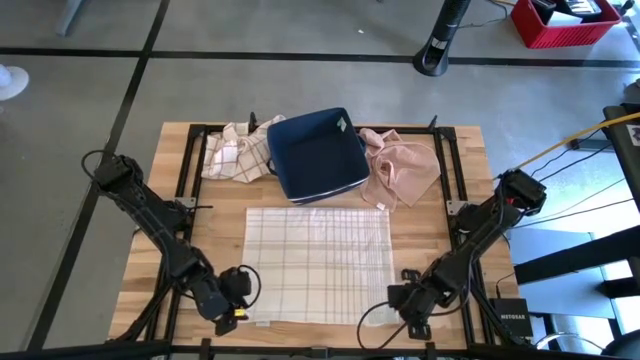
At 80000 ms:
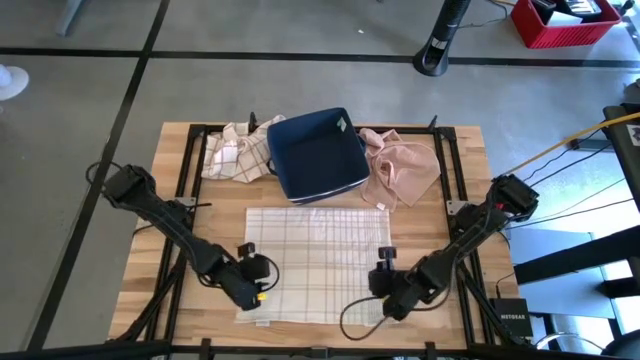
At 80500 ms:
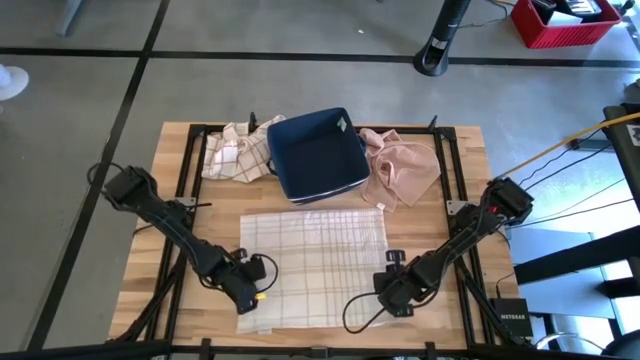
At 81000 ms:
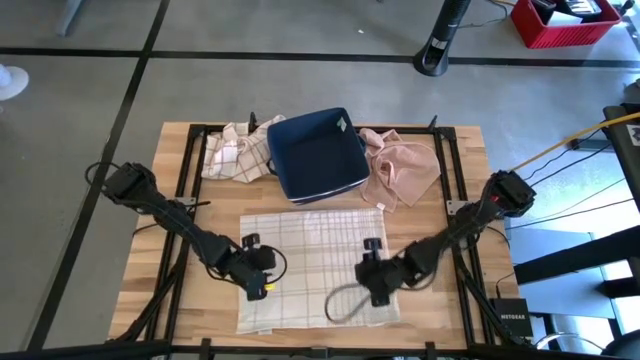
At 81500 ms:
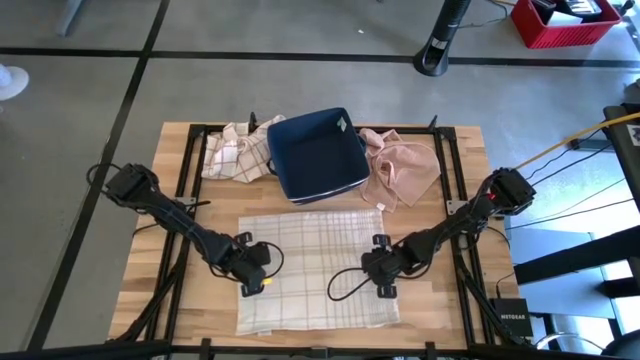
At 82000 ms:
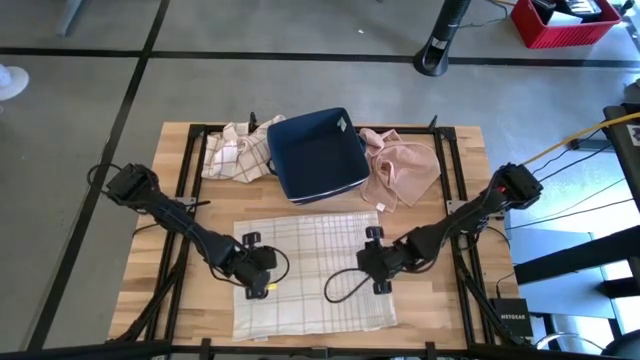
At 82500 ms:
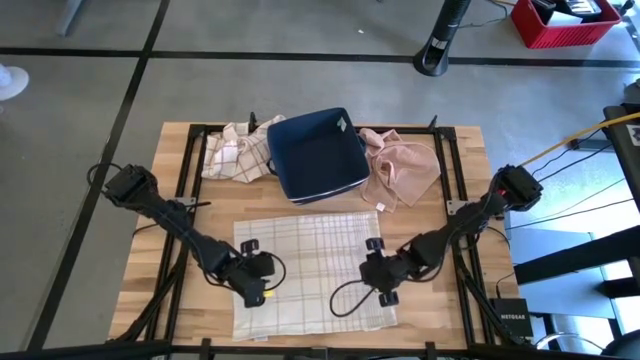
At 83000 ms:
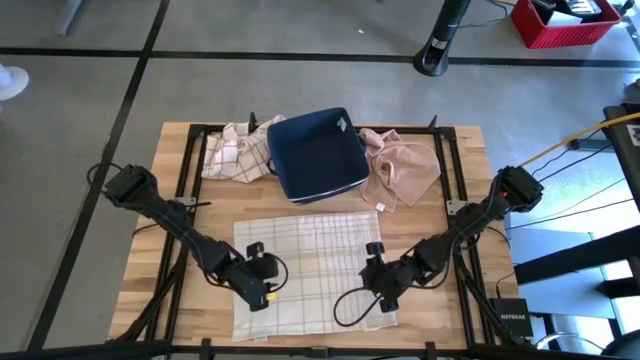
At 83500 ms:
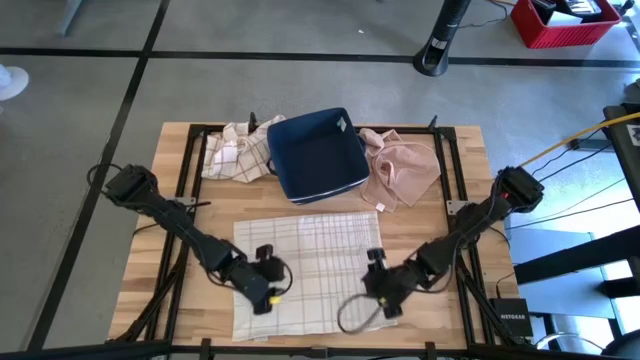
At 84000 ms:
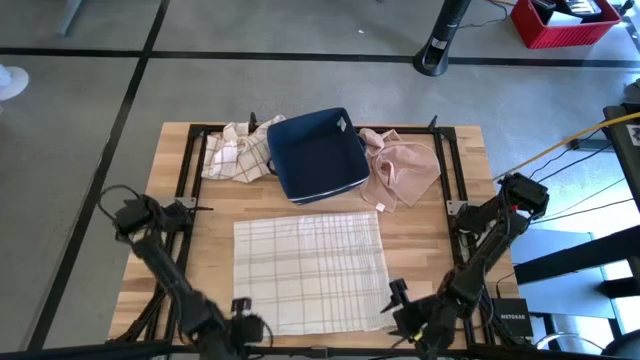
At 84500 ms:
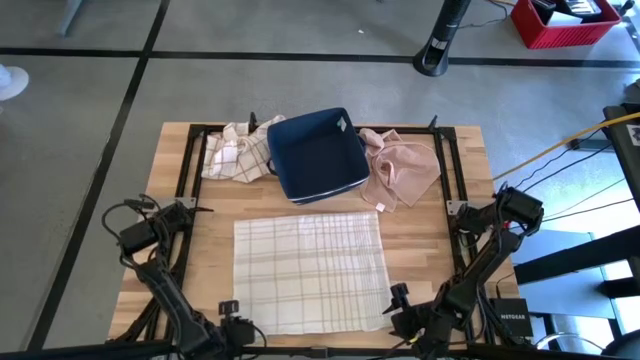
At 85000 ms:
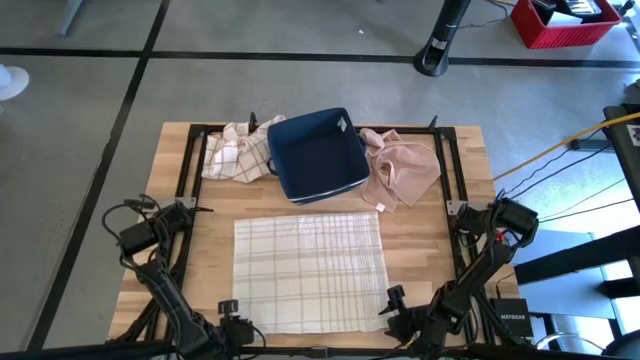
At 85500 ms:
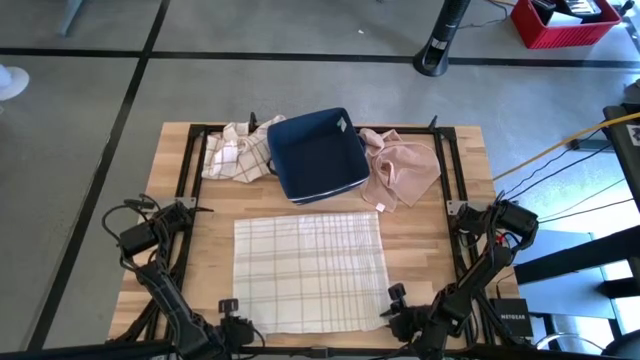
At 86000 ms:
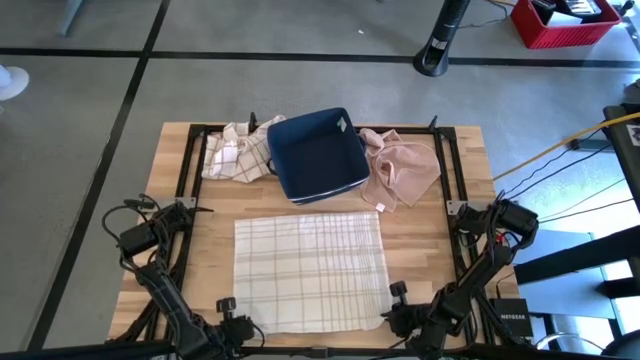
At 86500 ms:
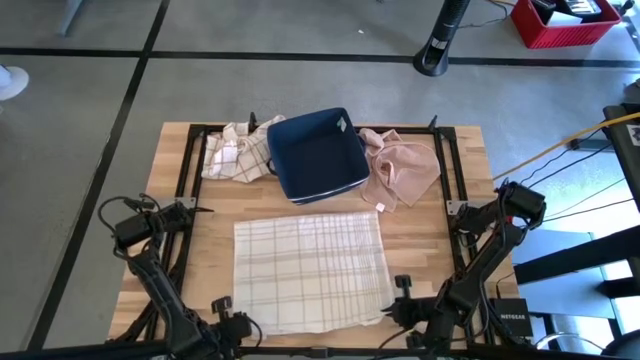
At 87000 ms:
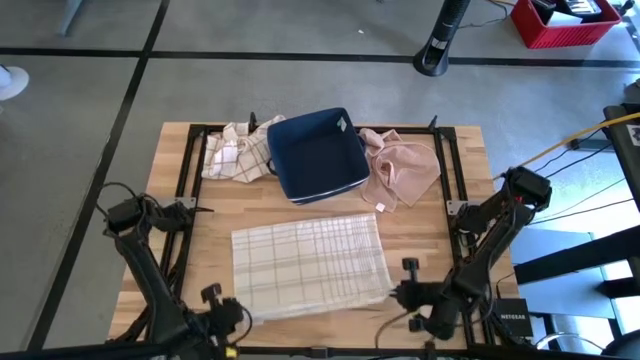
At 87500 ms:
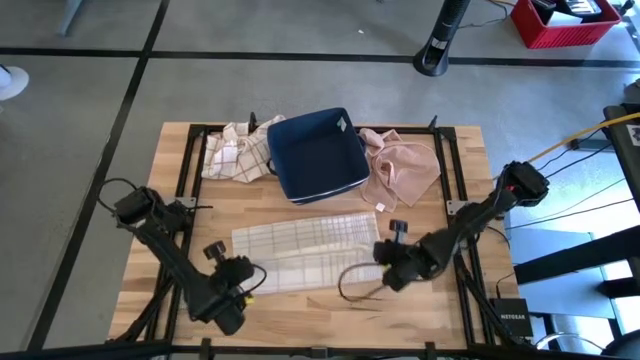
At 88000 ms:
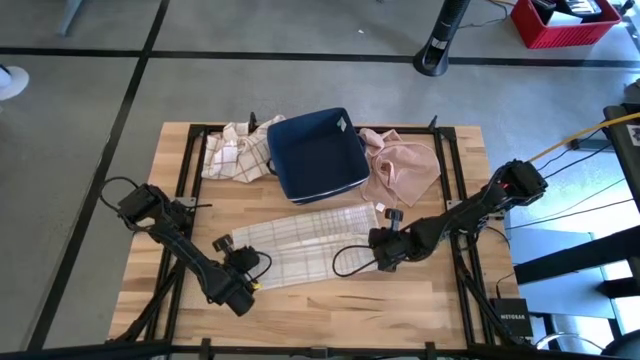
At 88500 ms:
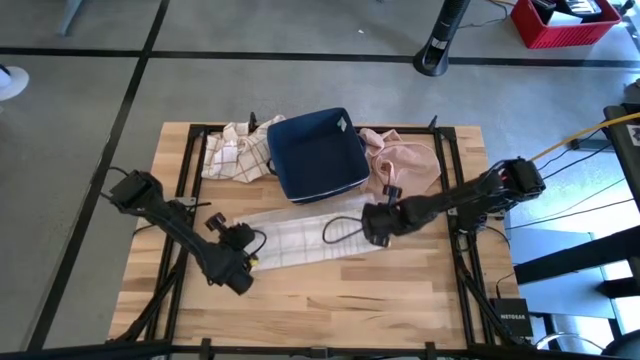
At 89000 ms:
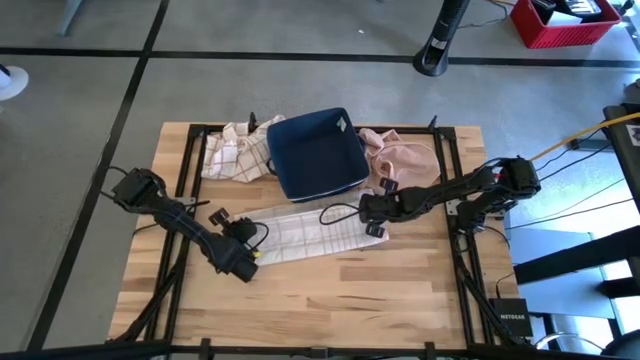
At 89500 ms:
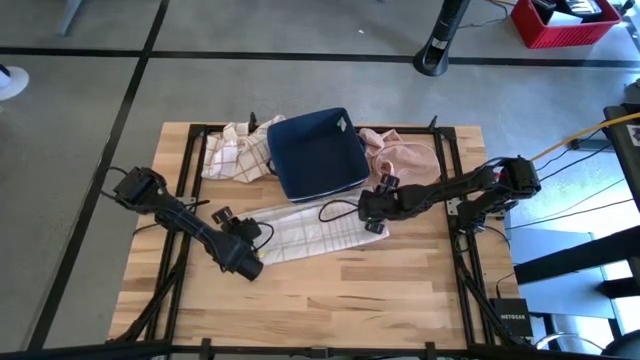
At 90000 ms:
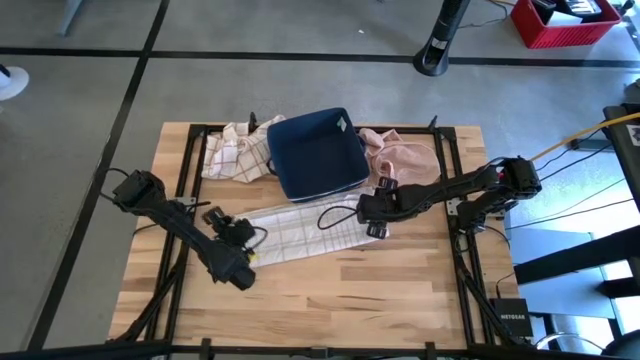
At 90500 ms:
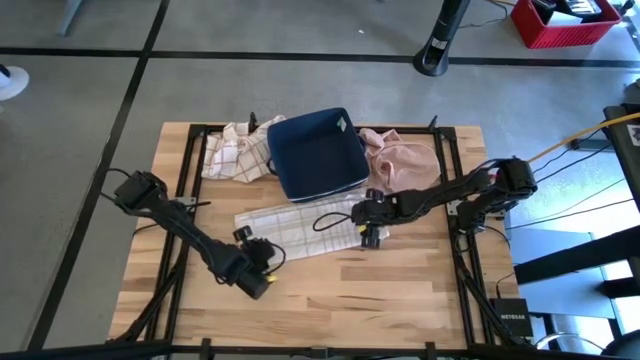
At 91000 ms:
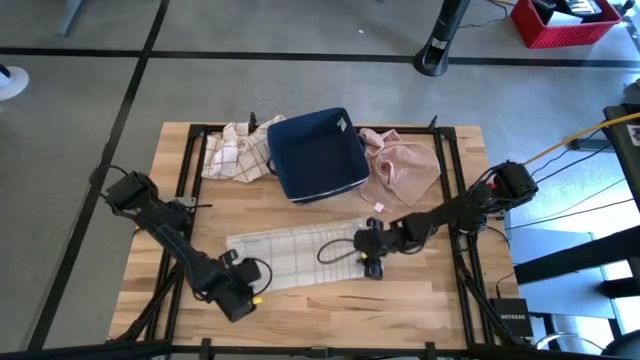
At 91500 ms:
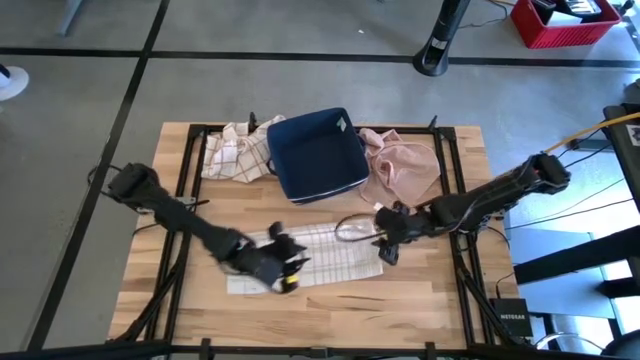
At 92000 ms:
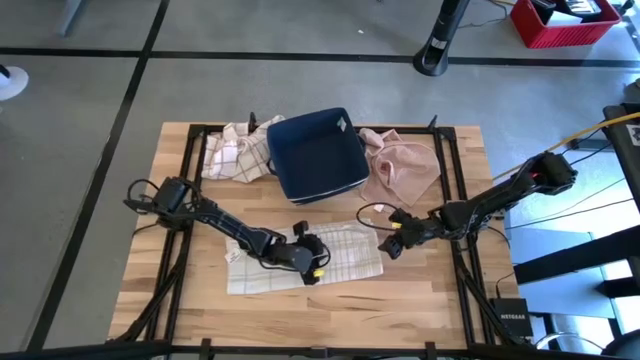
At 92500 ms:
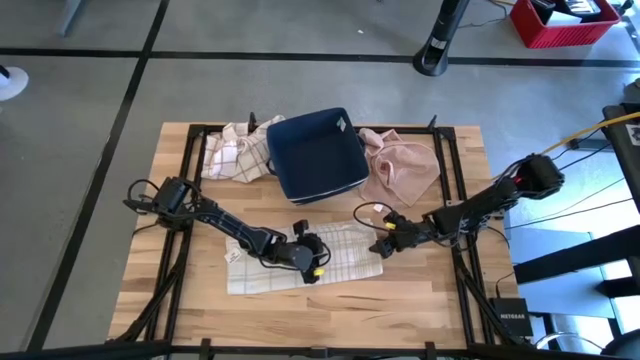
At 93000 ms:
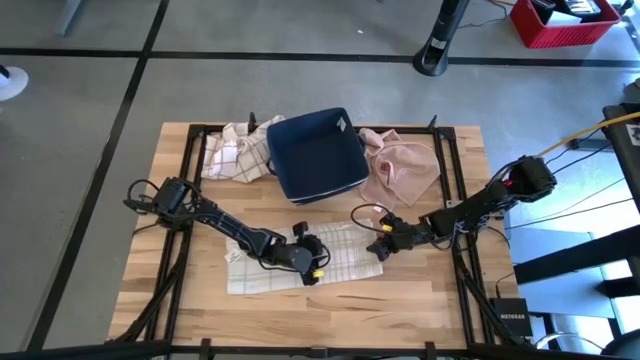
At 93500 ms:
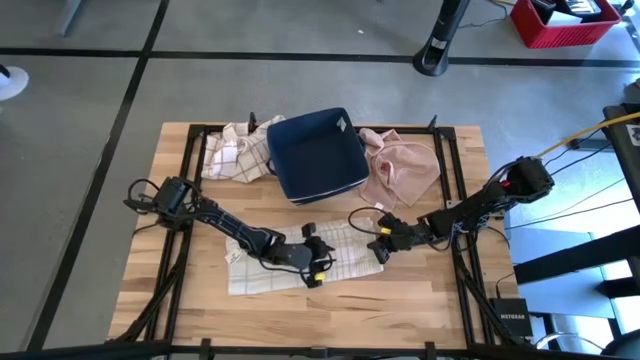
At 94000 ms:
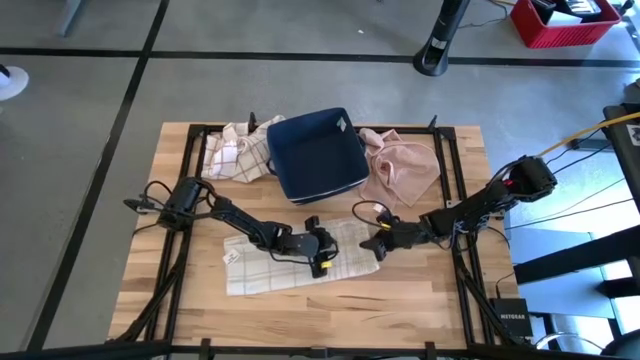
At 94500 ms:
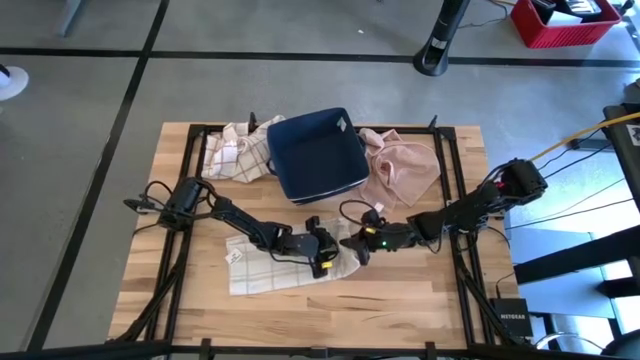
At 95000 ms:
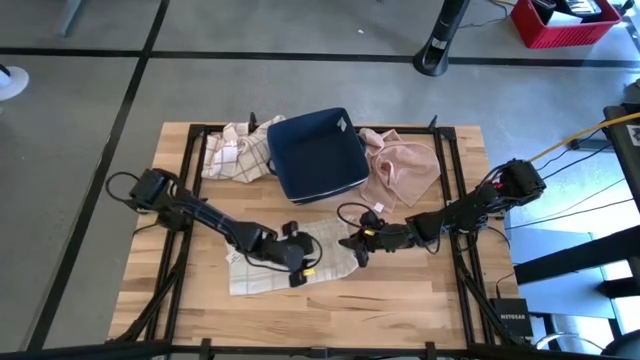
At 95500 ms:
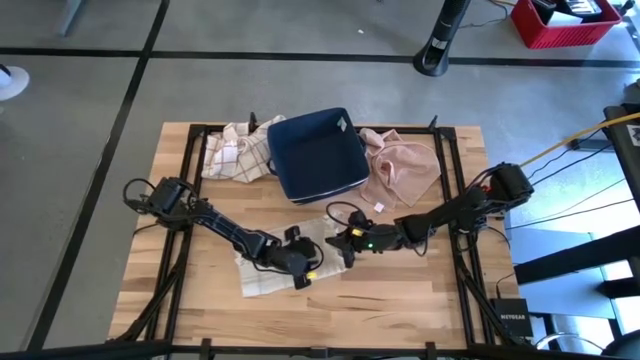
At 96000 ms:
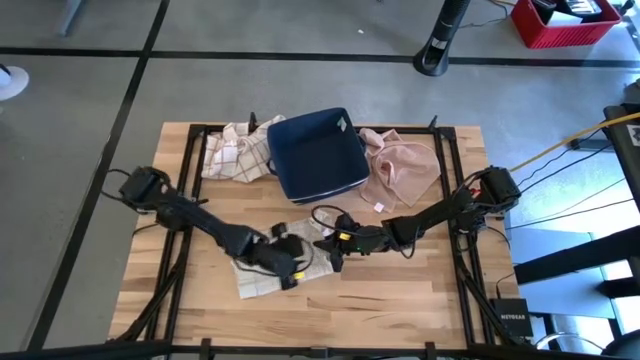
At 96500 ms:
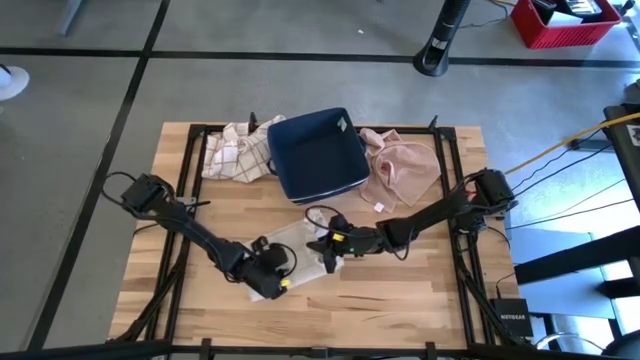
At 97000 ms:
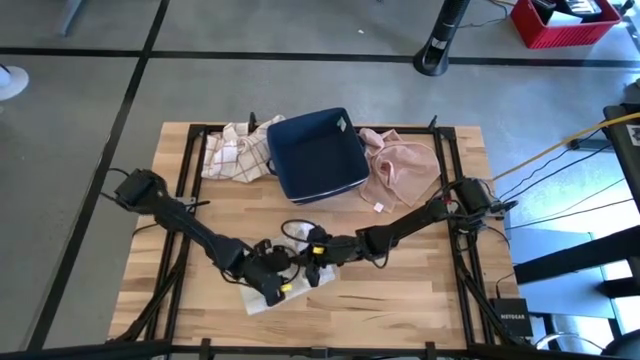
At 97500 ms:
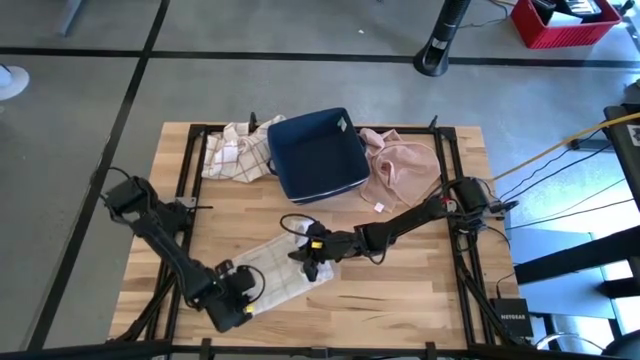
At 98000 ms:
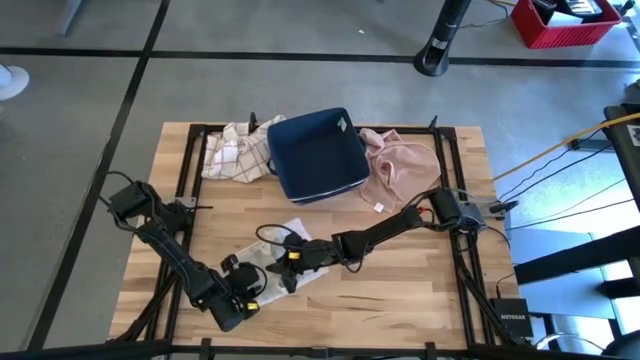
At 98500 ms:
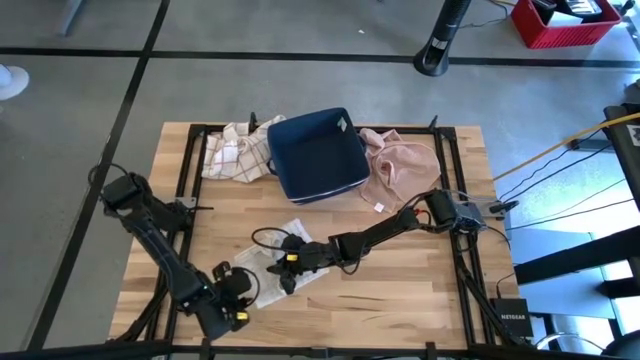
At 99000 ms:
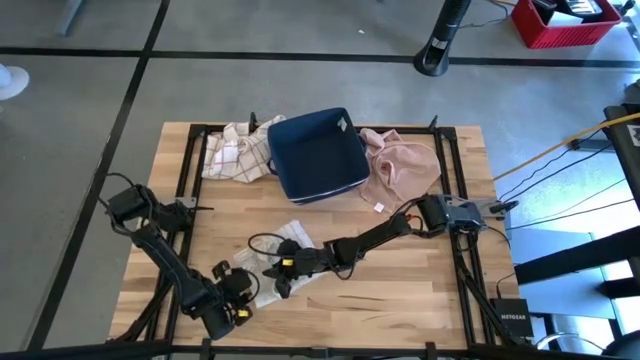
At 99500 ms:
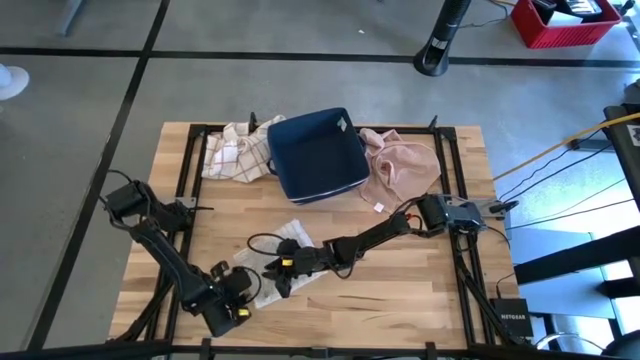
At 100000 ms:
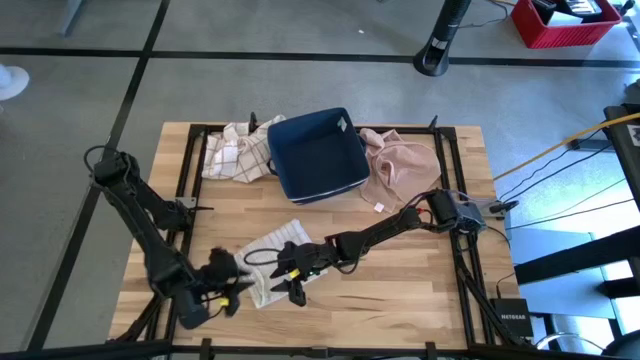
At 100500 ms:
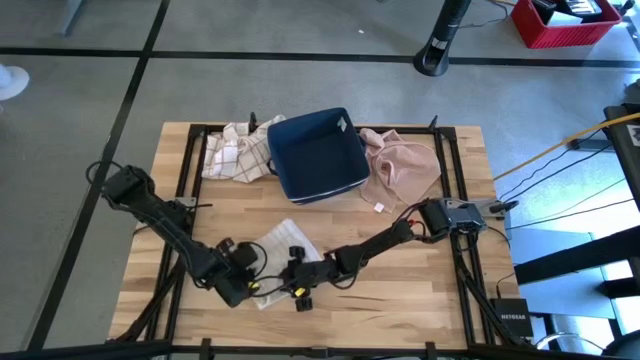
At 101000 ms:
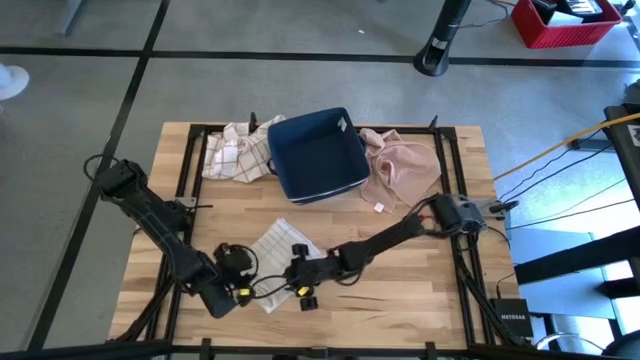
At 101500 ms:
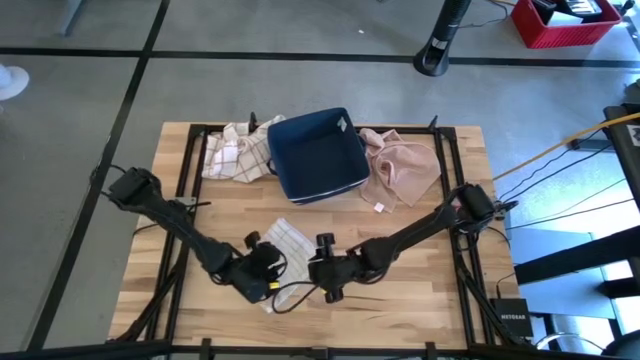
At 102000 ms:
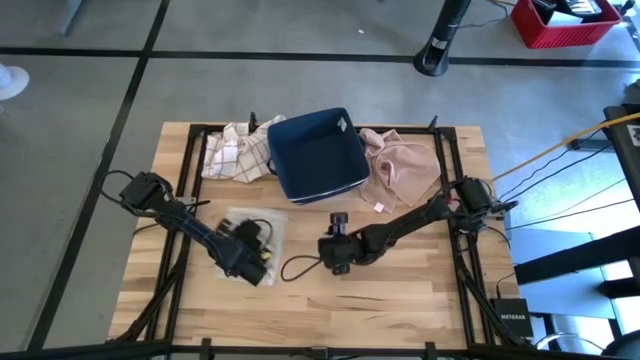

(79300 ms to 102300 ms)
Task: Fold towel
Fold the white with gray pattern towel on the table
